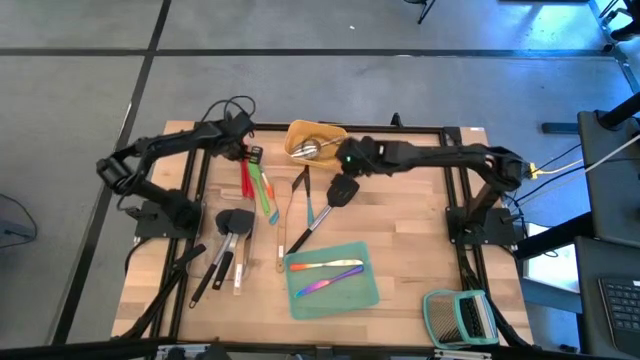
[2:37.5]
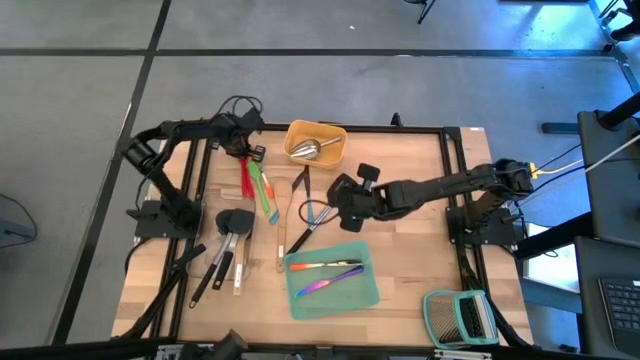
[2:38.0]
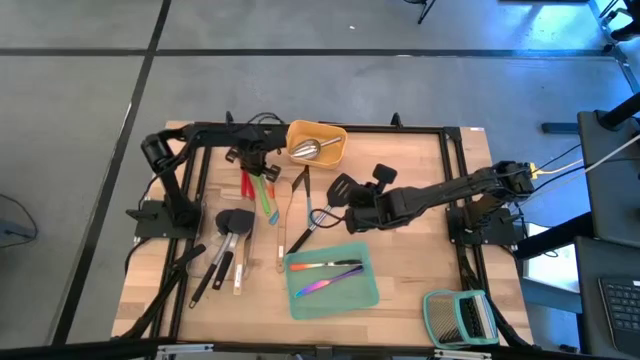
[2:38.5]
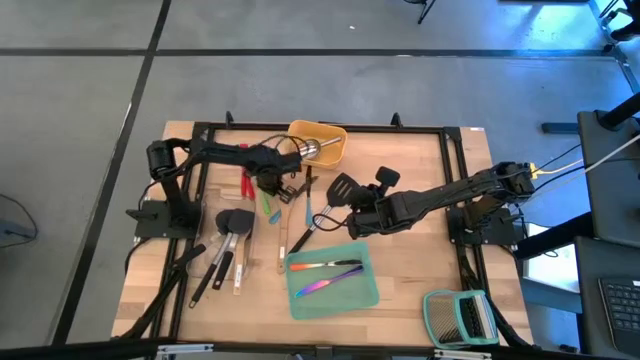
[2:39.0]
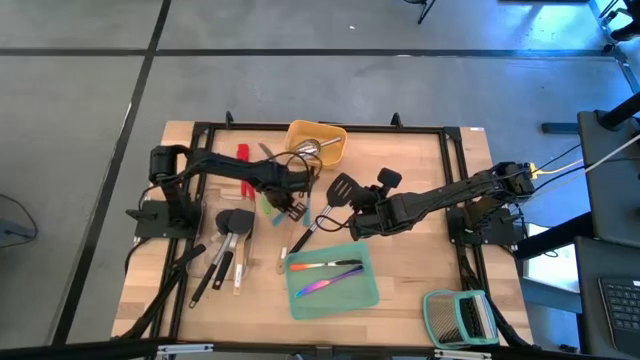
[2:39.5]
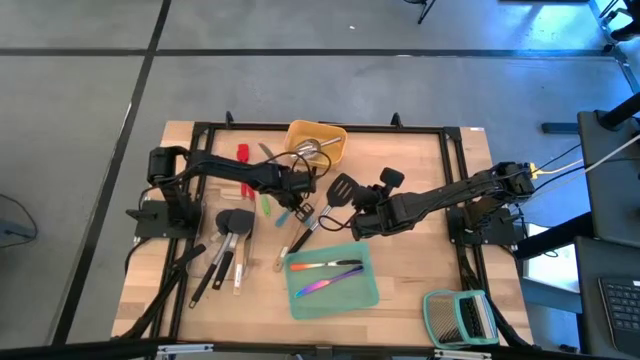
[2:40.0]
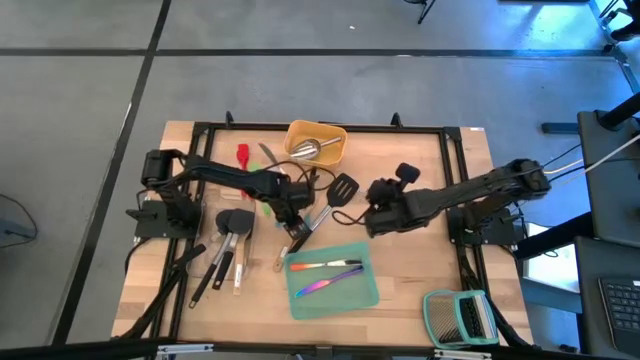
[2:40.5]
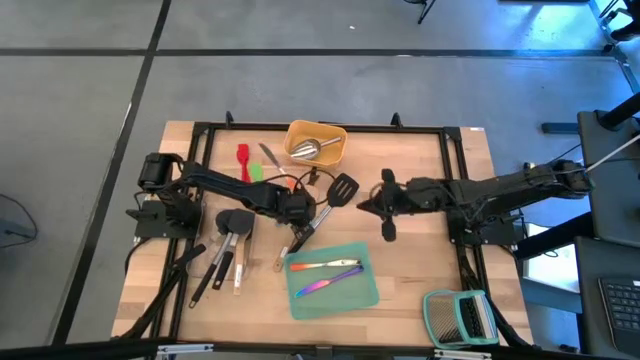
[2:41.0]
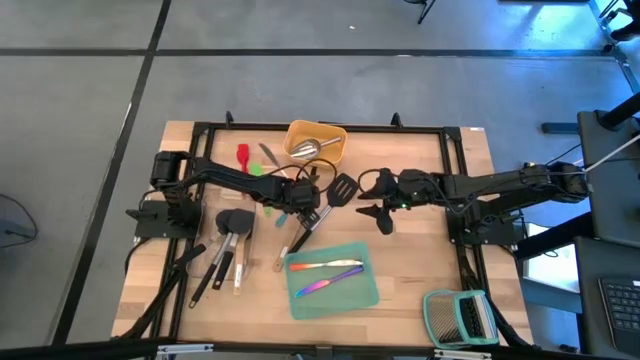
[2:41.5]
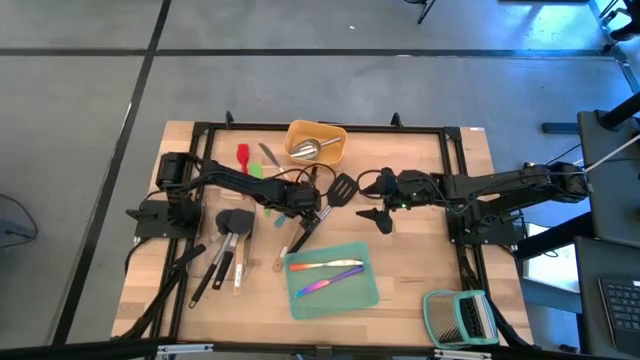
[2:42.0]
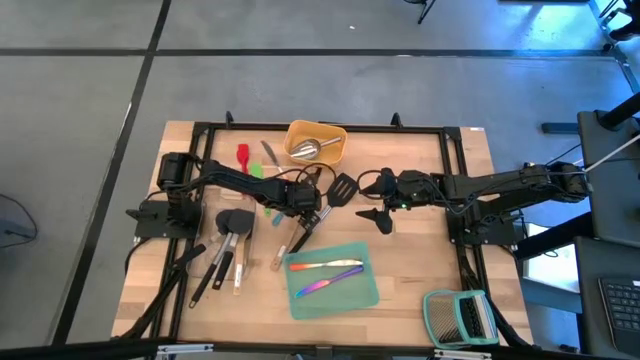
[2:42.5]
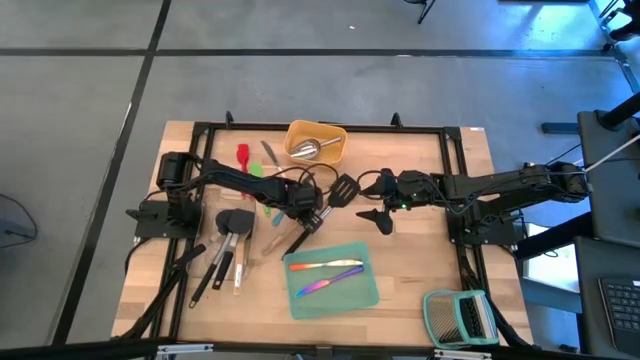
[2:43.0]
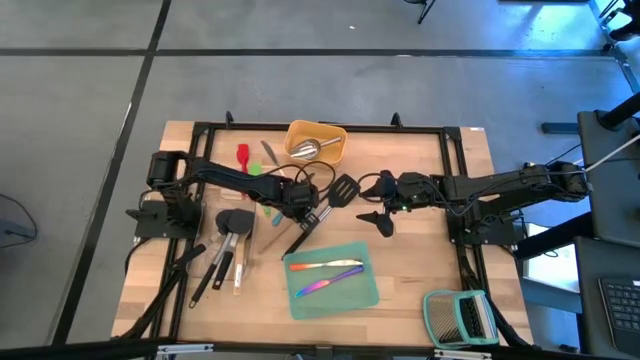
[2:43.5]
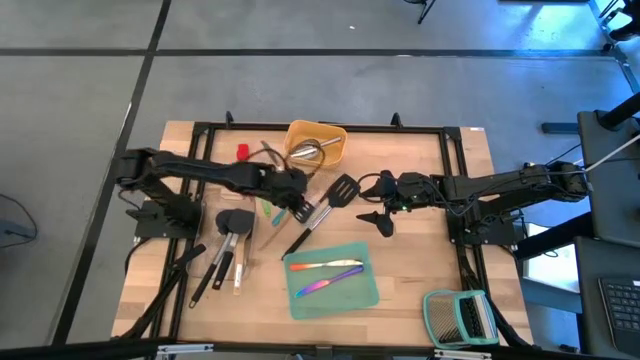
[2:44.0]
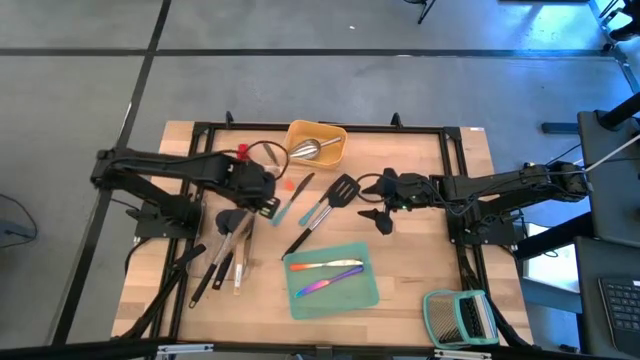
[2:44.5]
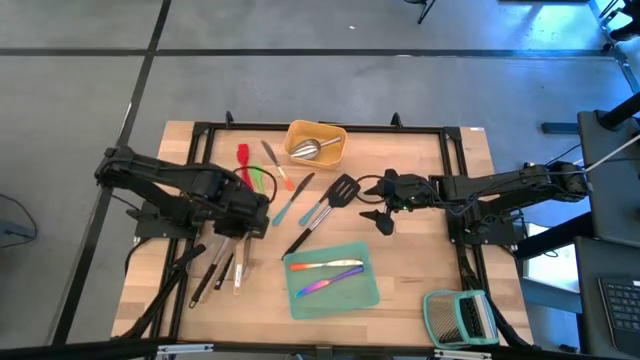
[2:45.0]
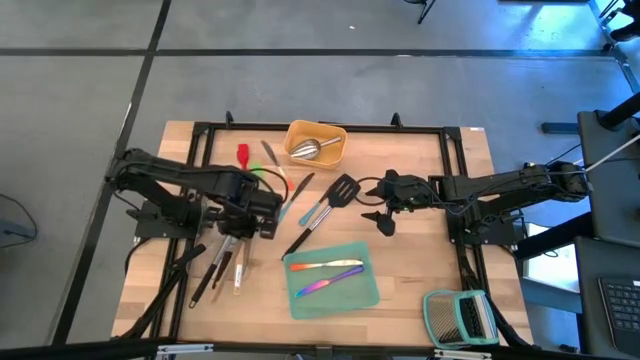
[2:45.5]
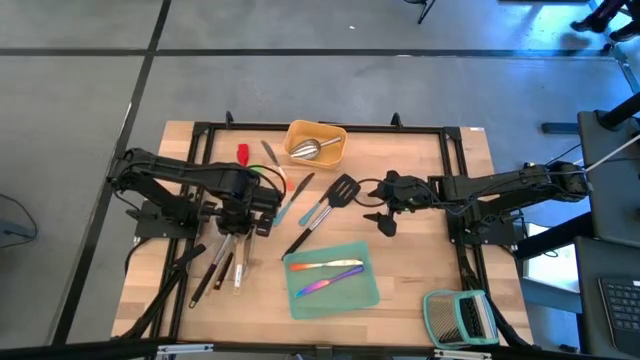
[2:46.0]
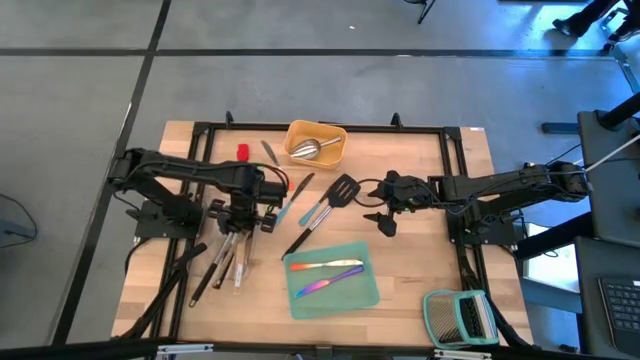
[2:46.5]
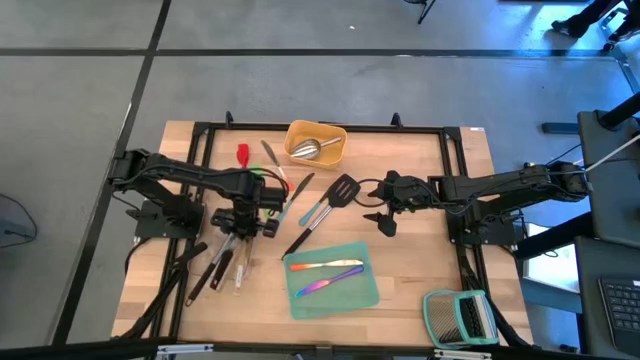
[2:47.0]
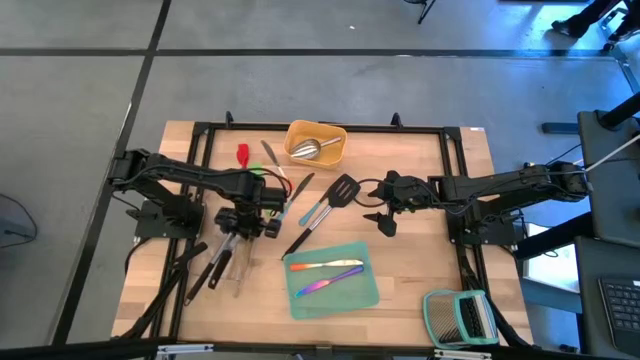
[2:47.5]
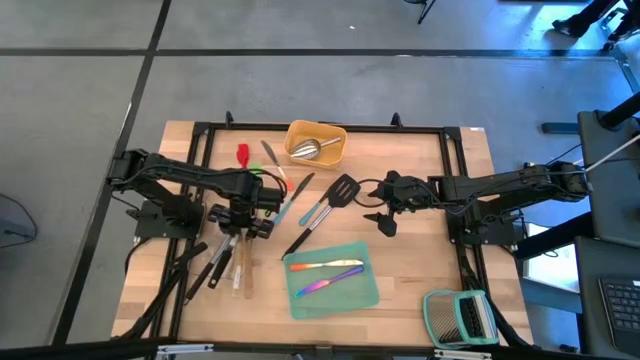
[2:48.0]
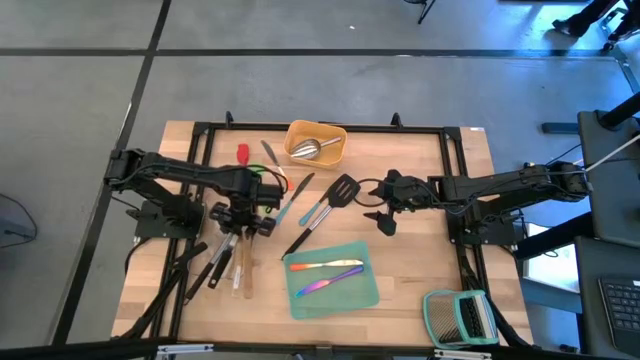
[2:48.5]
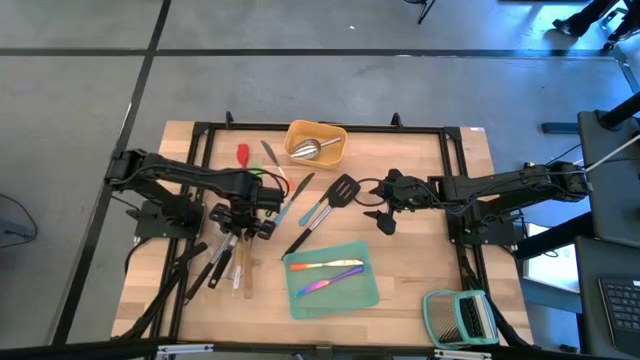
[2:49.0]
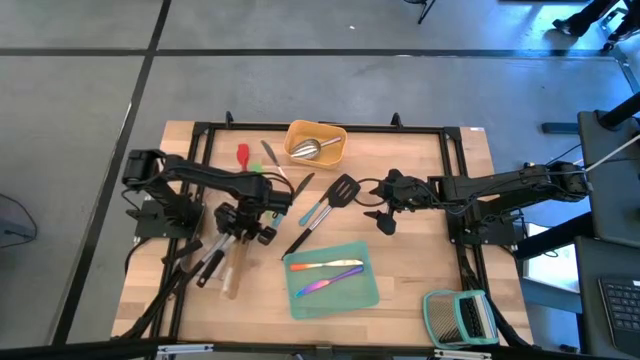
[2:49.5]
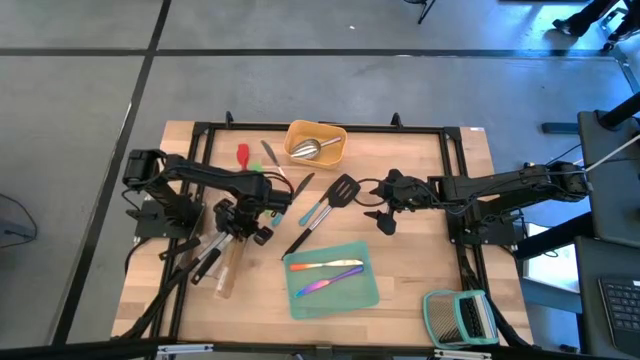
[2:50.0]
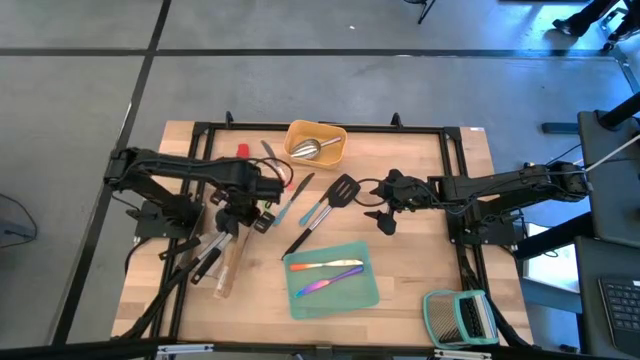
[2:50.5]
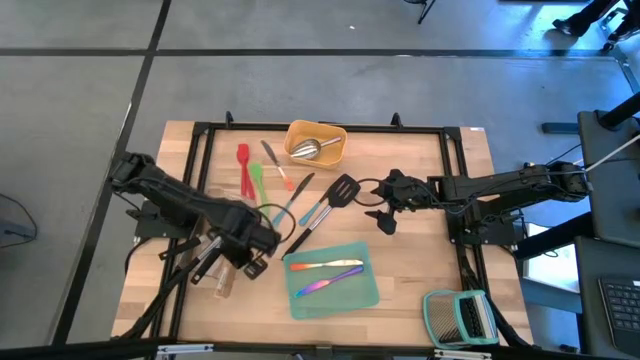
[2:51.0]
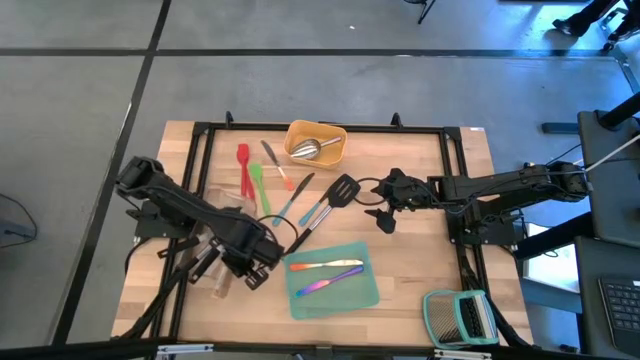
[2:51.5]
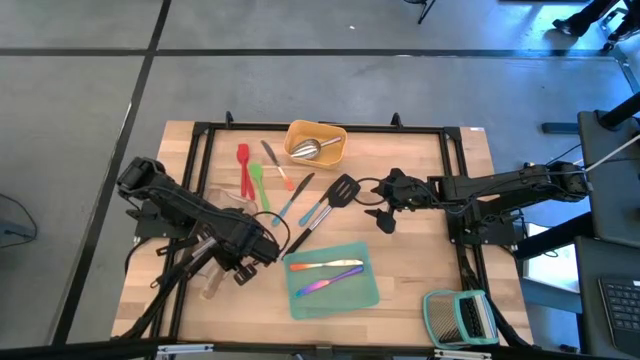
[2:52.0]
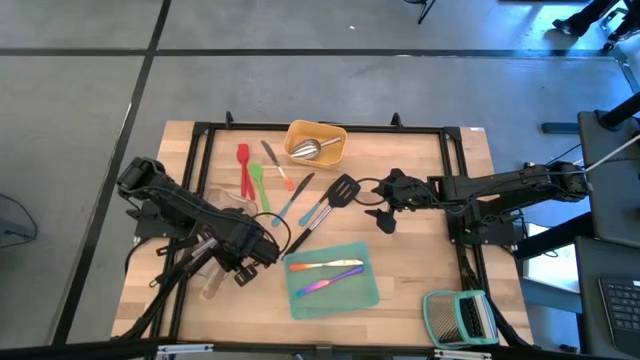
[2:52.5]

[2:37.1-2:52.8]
Task: Pick & Place Kitchen Items
Put the wooden spatula into the transparent bin

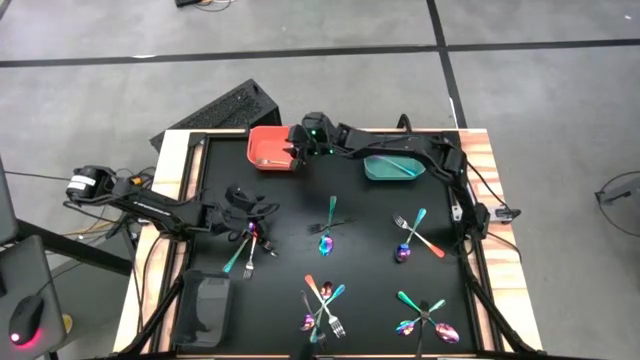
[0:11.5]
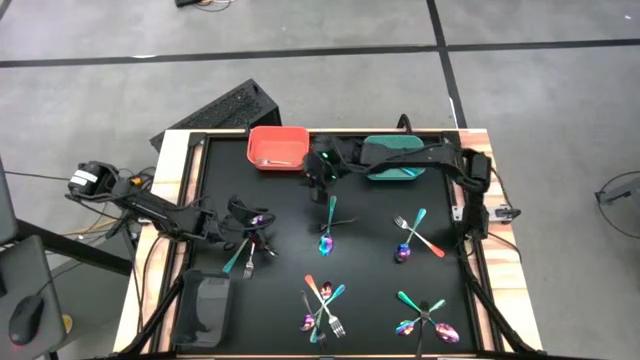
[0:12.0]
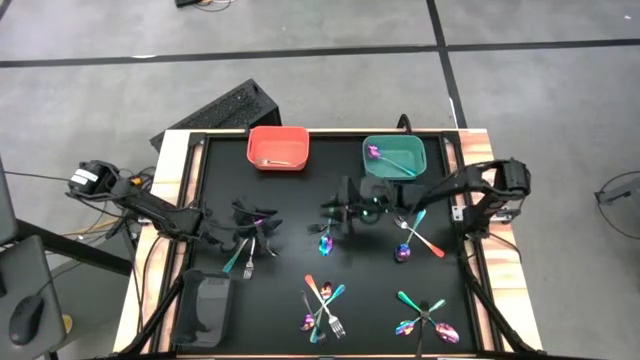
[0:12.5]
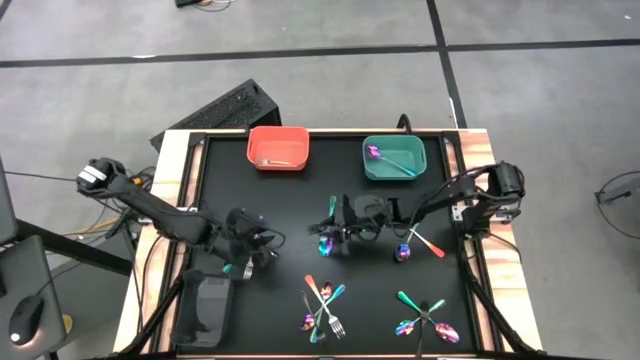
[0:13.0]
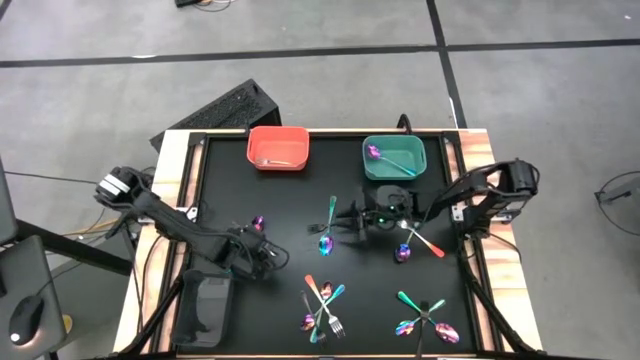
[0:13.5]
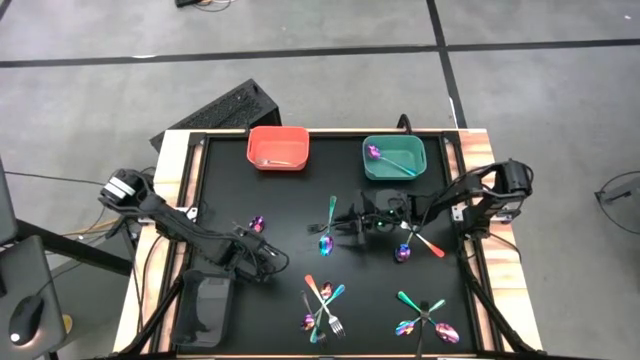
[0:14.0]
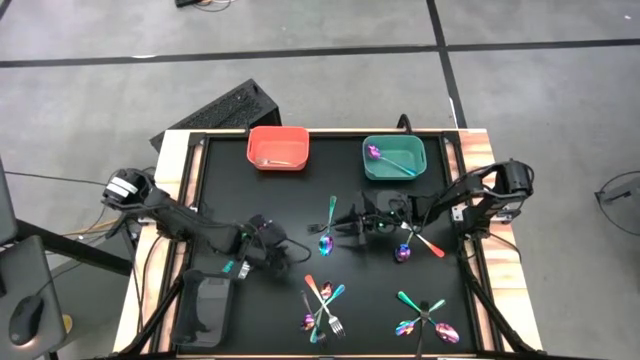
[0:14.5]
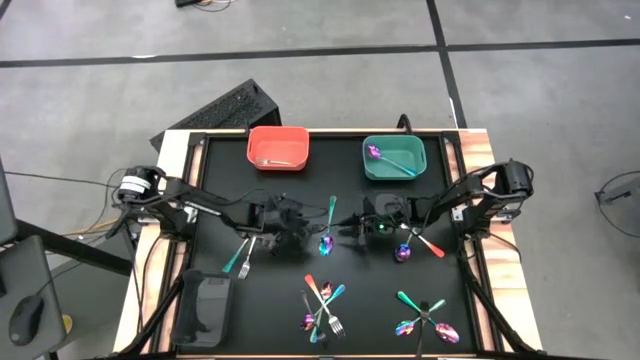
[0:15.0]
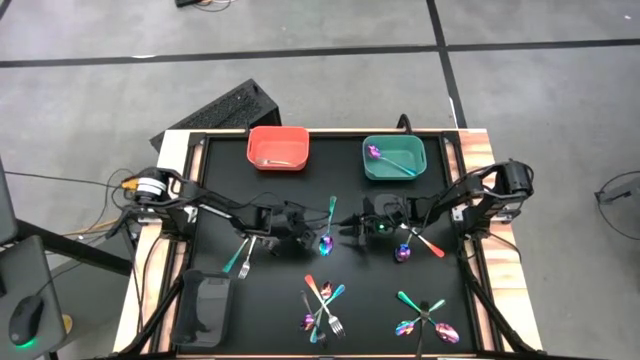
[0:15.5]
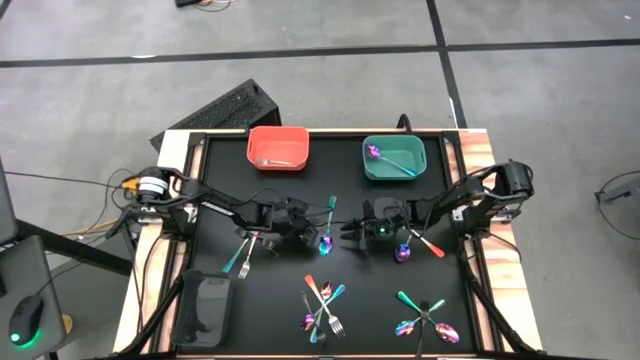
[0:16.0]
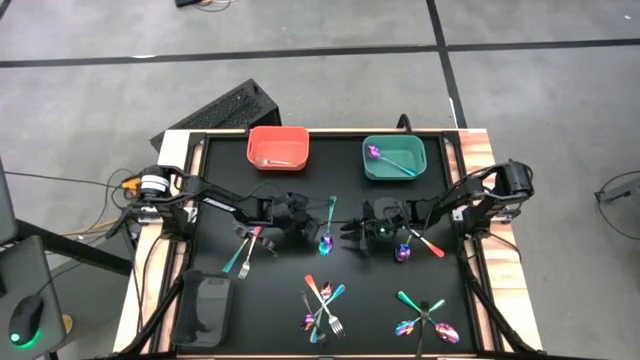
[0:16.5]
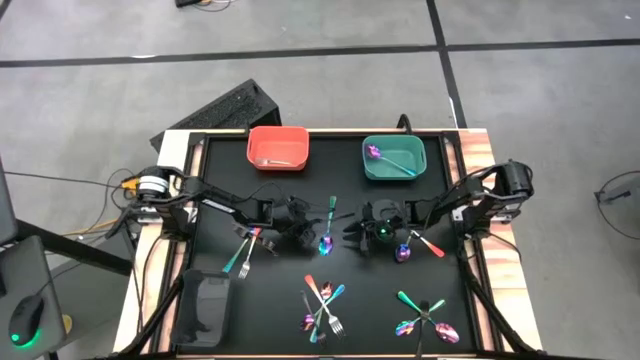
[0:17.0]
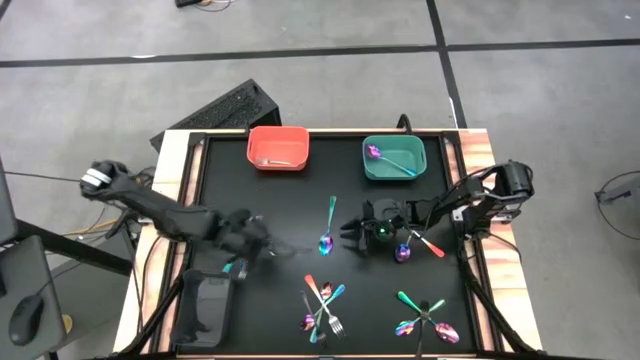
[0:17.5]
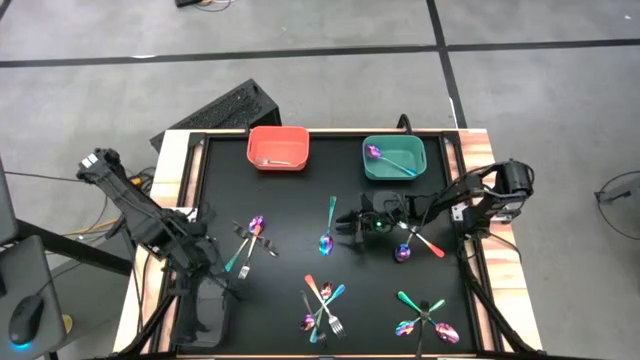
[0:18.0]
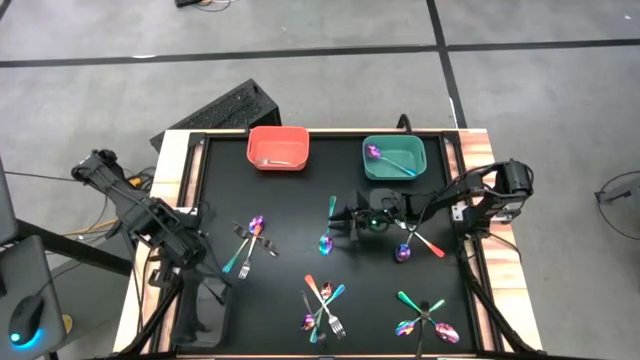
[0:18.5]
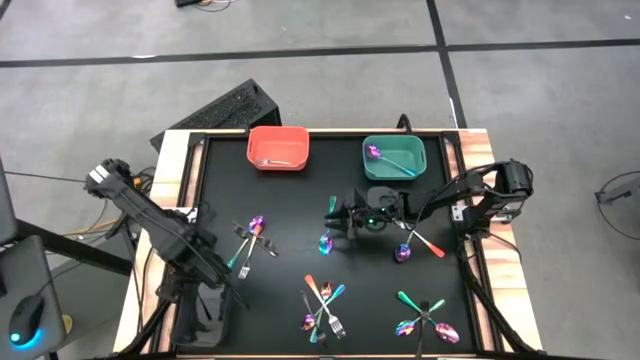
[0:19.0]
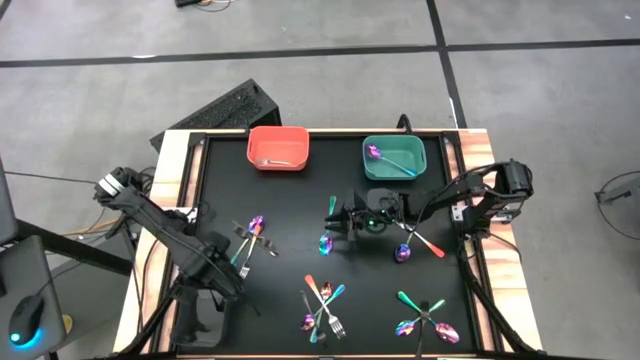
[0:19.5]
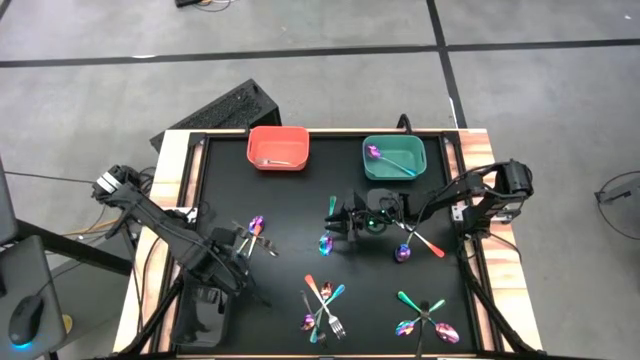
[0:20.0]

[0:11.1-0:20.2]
Task: Sort silverware by color (type)
Put the black fork into the black bin
